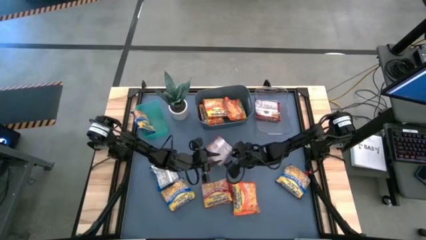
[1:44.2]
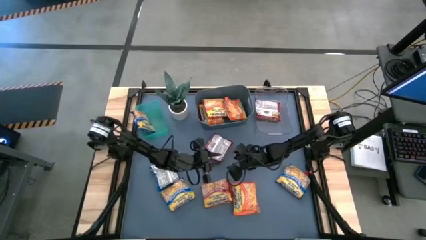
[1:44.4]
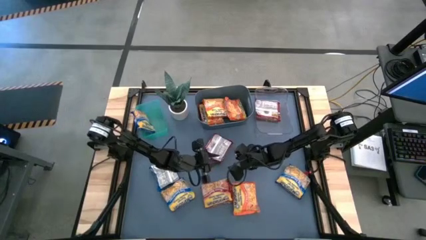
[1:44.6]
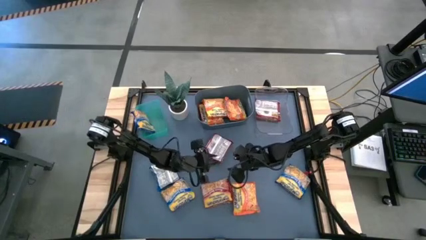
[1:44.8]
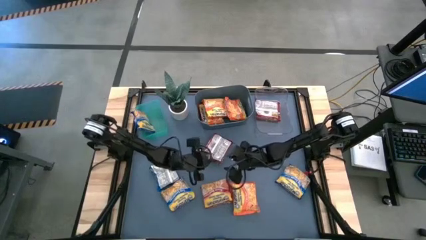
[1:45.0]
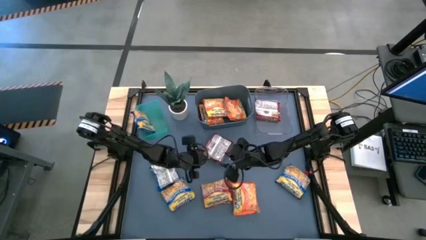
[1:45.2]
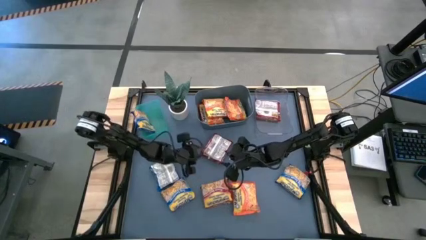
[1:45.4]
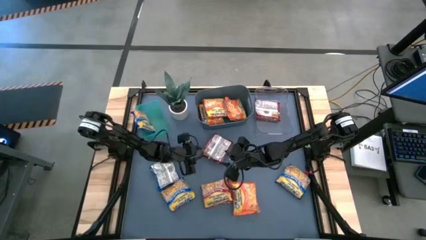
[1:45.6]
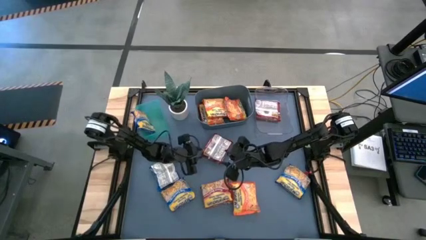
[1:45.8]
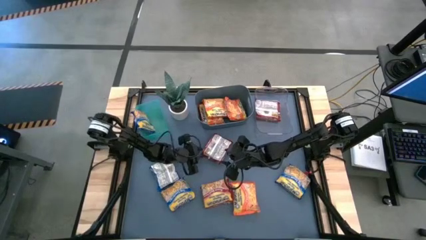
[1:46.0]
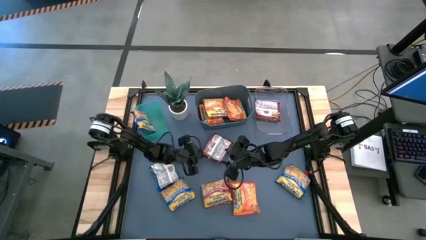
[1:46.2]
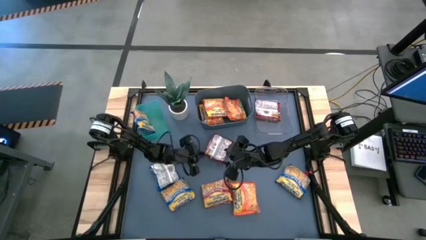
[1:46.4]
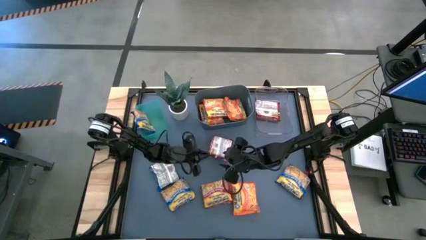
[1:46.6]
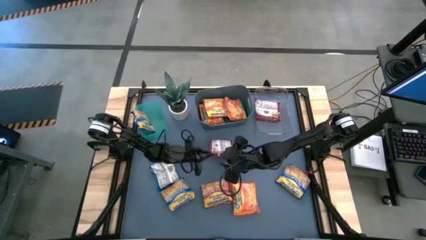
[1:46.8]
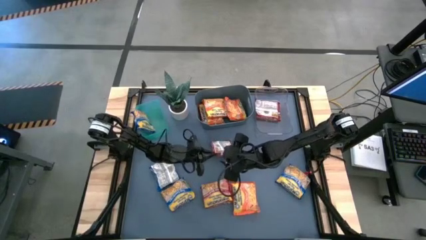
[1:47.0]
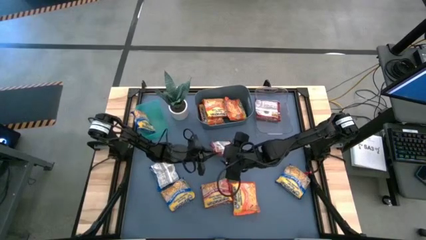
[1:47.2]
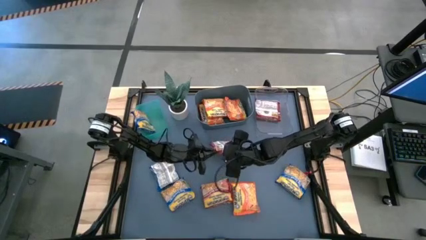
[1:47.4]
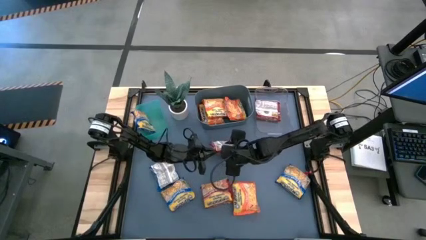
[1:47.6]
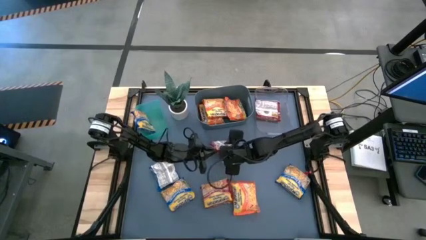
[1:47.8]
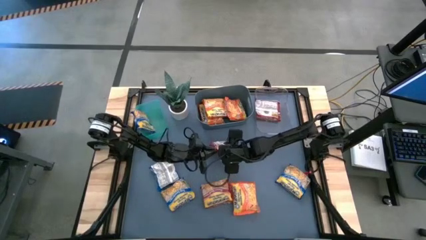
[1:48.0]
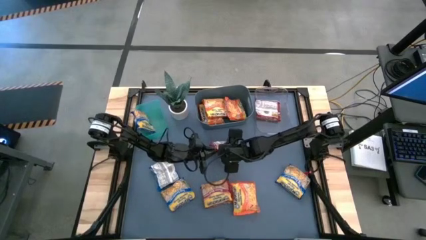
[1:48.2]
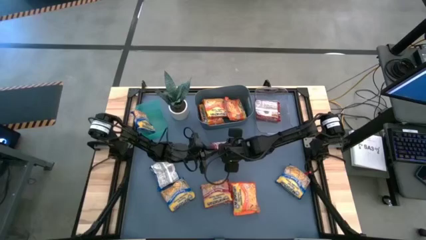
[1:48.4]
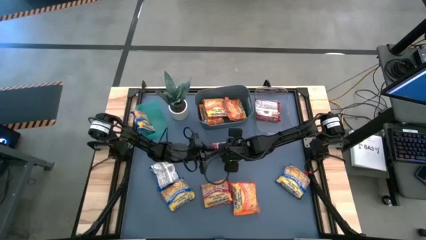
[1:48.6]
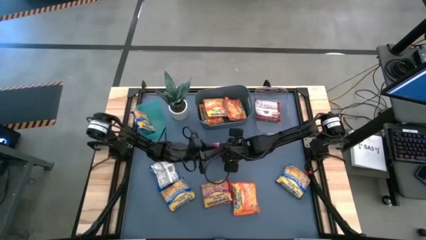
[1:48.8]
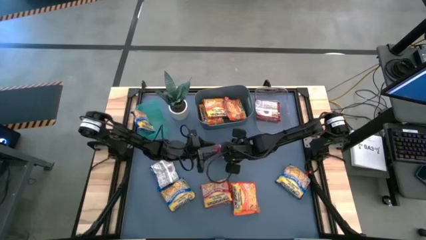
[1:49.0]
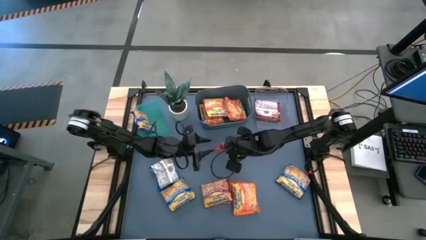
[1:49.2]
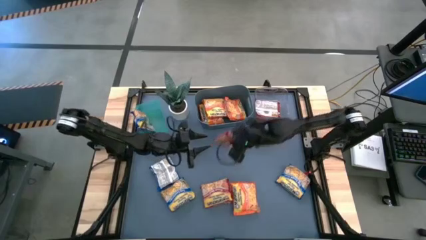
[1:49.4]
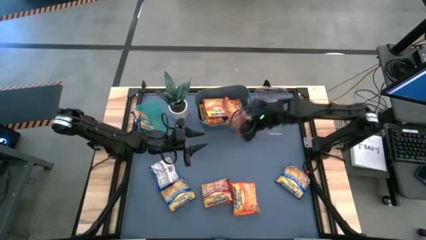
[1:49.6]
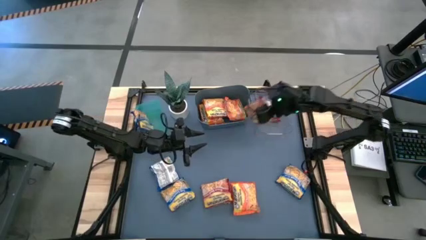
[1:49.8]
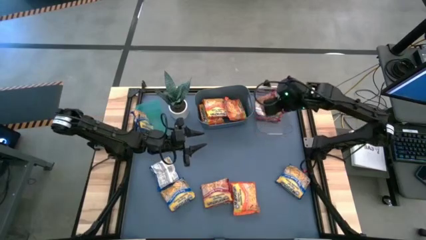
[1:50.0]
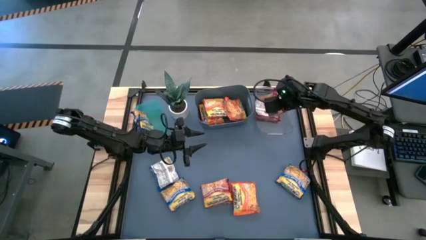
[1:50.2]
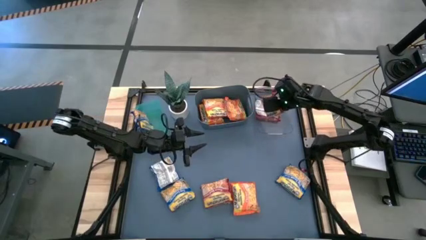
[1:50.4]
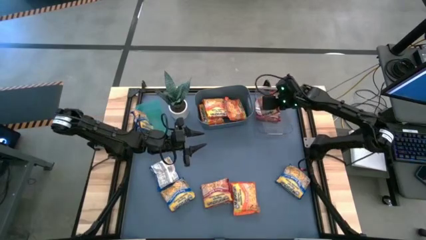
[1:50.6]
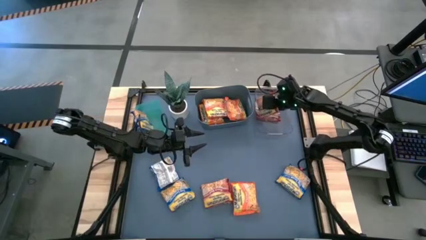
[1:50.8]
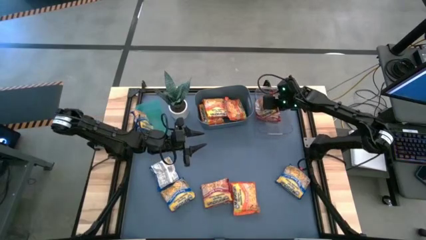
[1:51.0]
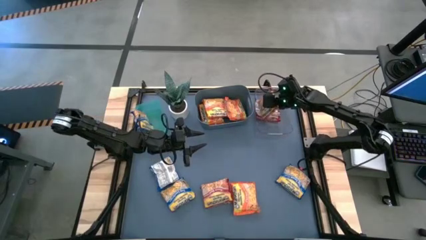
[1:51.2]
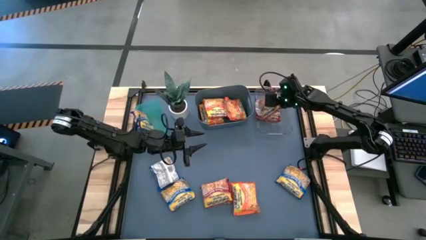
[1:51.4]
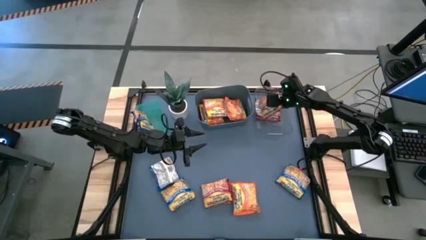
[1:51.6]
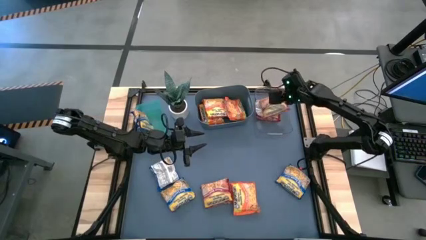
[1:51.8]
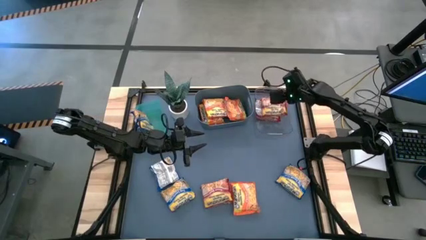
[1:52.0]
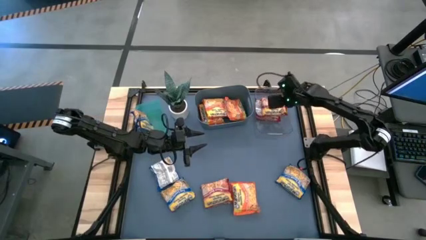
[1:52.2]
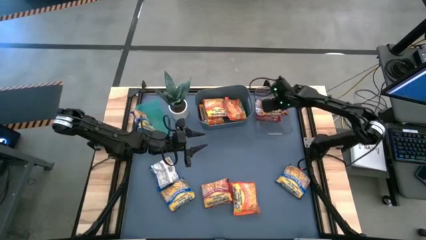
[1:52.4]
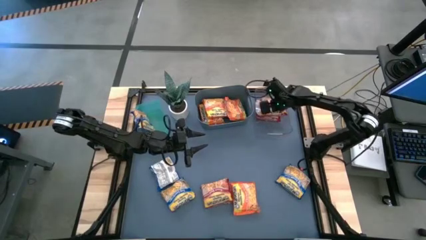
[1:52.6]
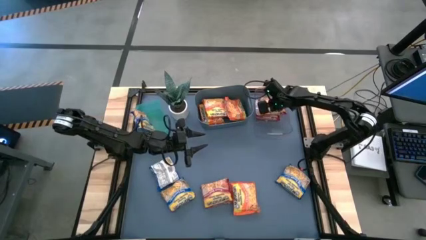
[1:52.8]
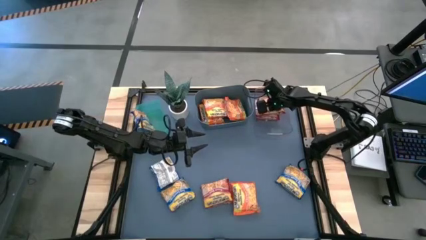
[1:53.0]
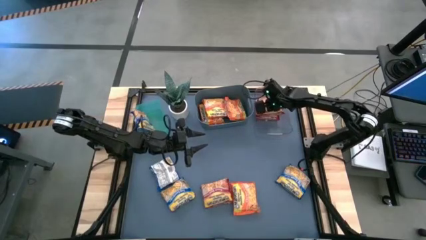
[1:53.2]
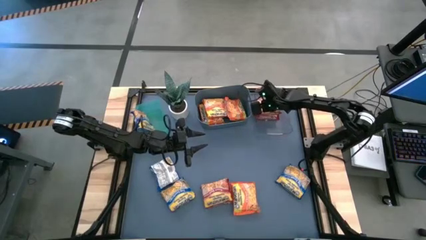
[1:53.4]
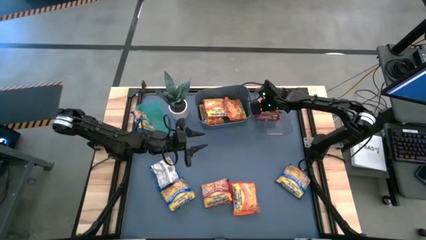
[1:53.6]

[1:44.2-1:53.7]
Task: Sort Maruchan noodles
Put the red noodle pack into the transparent bin

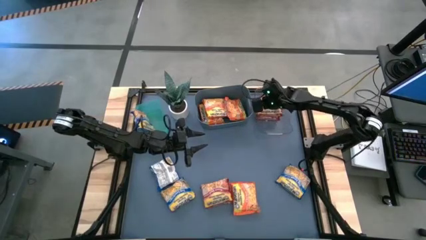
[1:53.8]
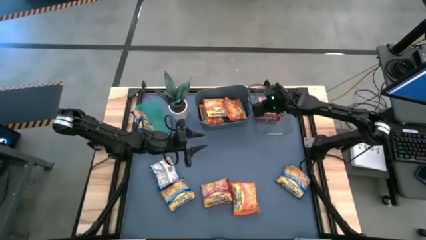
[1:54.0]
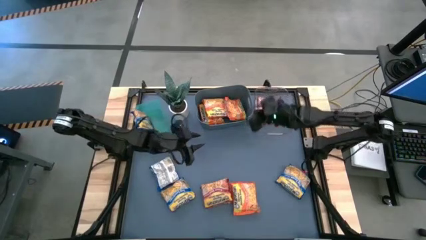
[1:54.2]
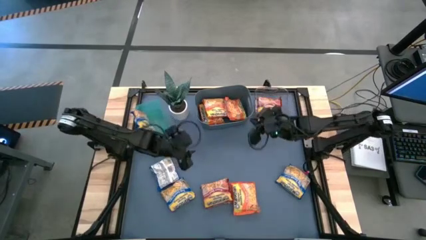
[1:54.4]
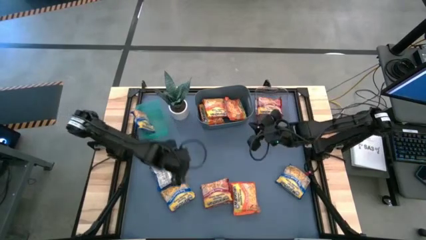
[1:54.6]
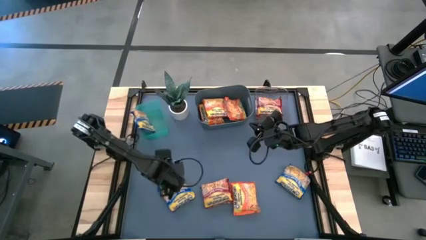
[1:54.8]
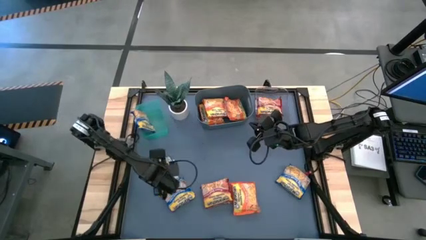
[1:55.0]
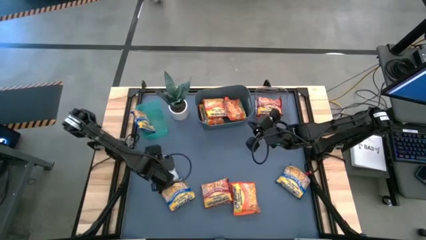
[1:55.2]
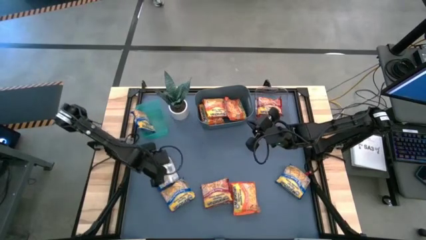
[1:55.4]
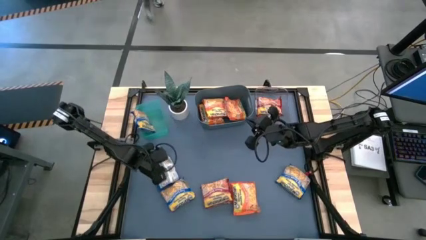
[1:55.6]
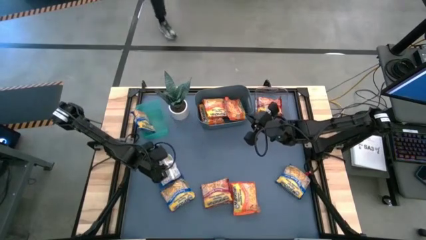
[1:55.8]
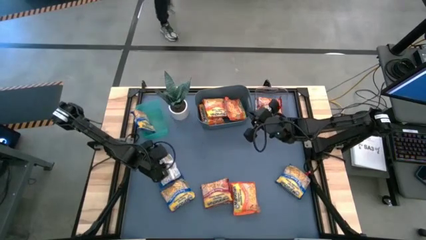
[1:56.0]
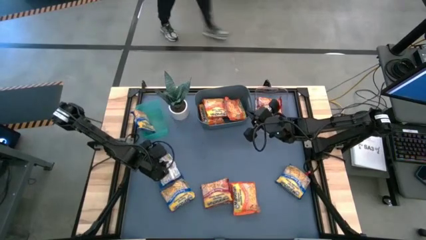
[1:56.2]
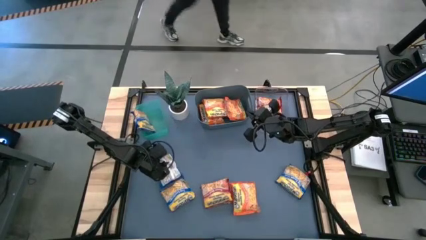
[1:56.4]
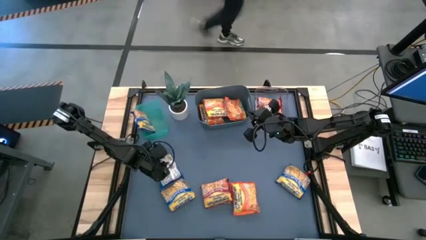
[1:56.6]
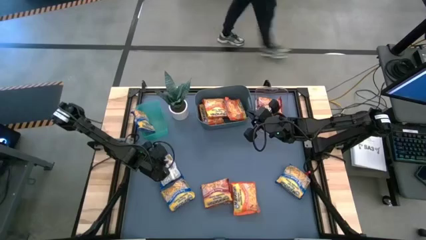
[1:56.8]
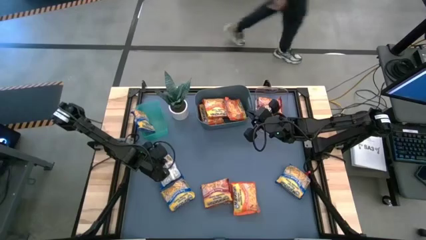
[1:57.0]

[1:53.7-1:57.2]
Put the blue noodle pack into the green bin

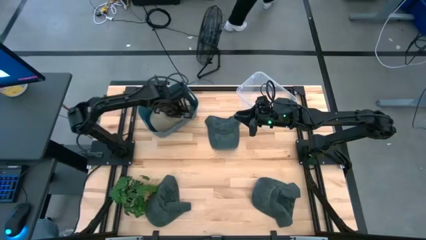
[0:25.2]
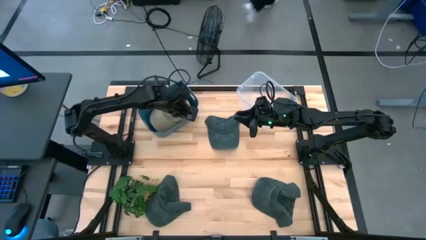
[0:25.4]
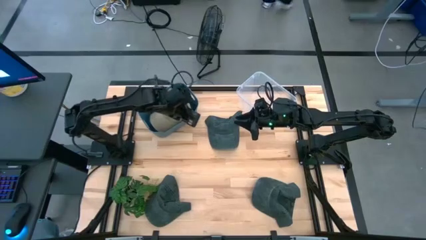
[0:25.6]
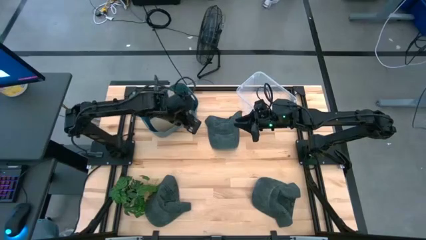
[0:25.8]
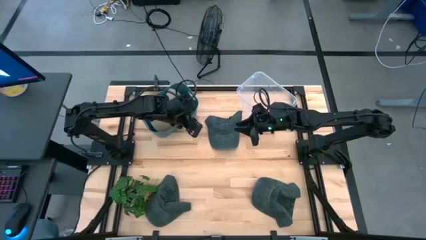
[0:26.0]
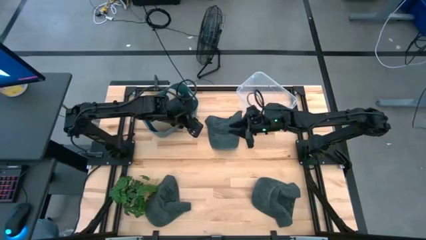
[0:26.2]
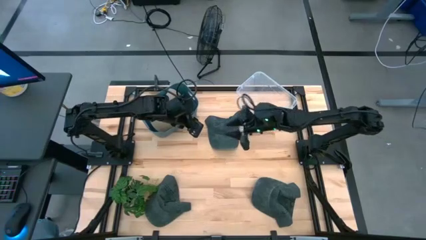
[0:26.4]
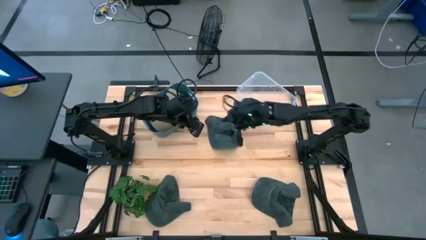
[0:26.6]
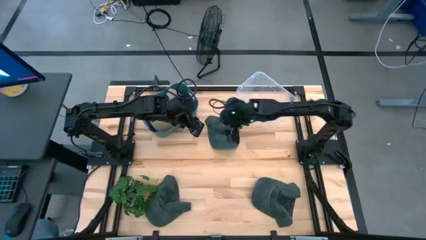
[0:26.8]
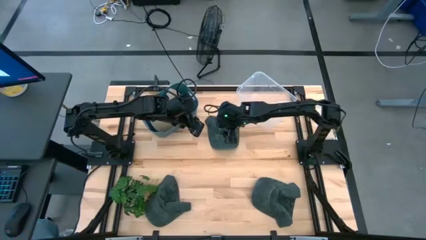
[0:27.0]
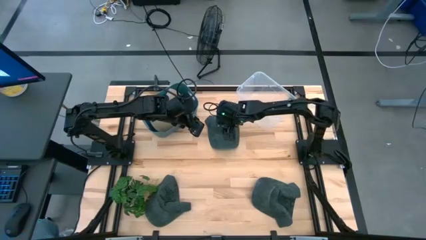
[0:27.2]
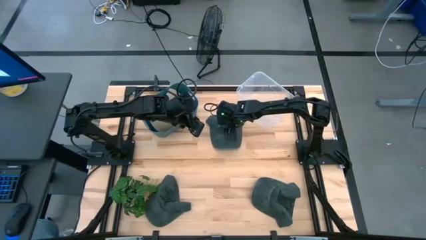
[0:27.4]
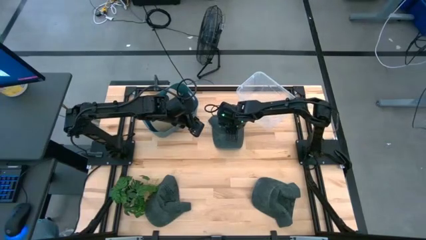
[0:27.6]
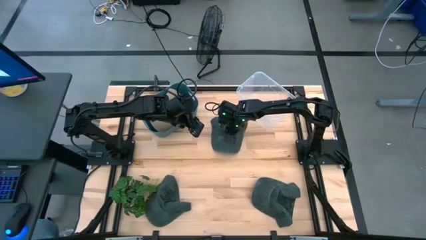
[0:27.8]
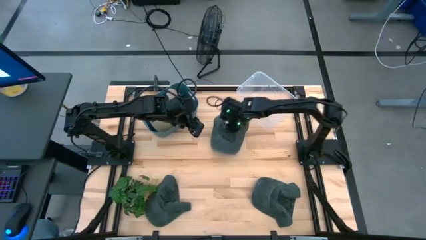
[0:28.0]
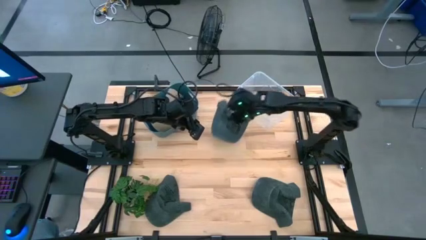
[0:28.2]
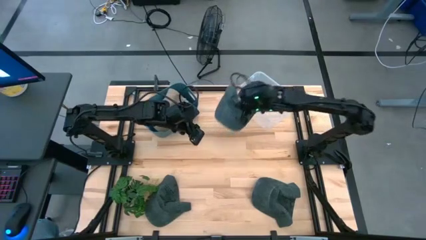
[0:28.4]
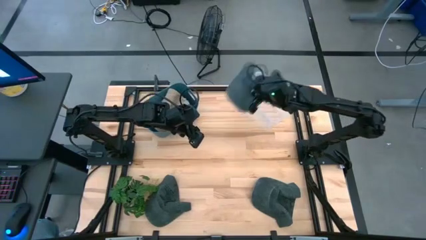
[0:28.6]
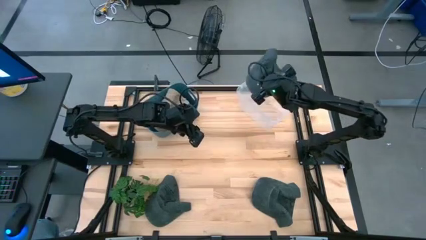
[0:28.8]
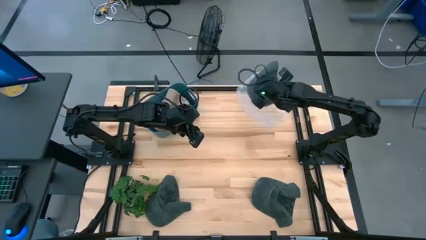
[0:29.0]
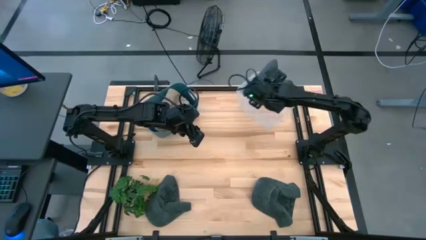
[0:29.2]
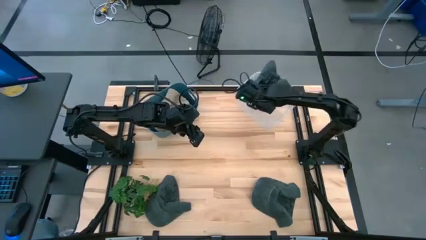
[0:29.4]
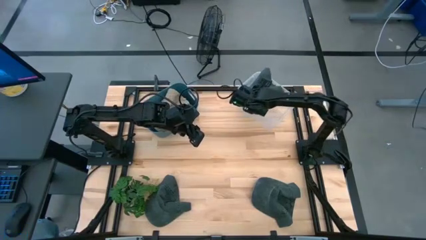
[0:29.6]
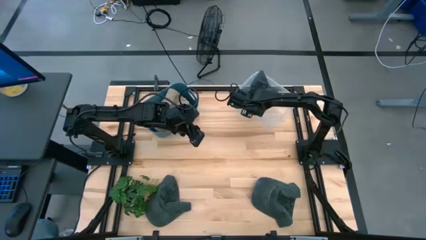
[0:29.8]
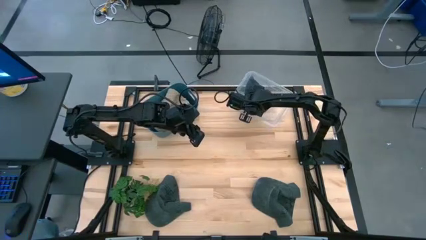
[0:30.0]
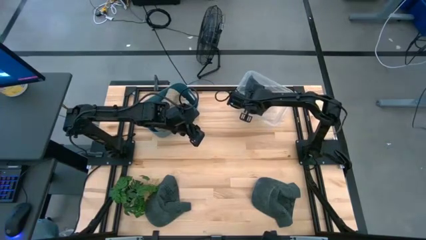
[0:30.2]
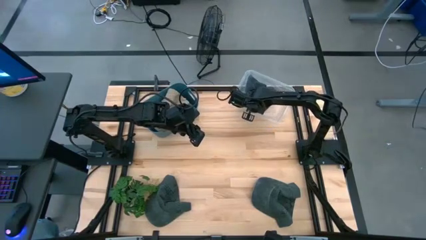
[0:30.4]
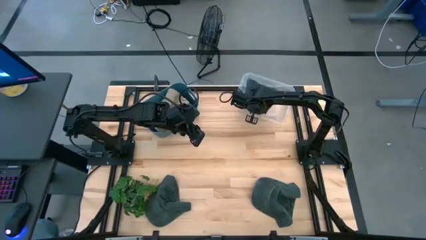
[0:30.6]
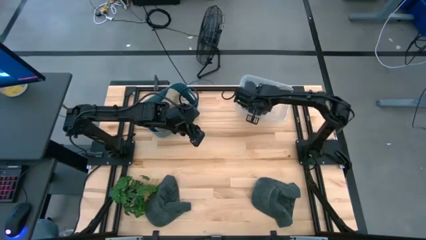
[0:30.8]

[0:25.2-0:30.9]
Task: Pick & Place hat
Put the top black cap into the transparent bin
